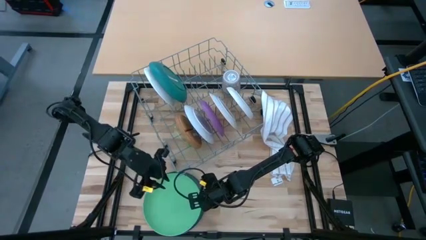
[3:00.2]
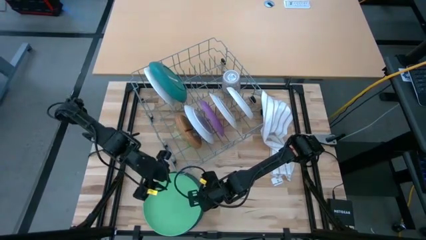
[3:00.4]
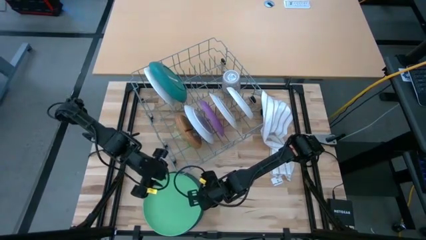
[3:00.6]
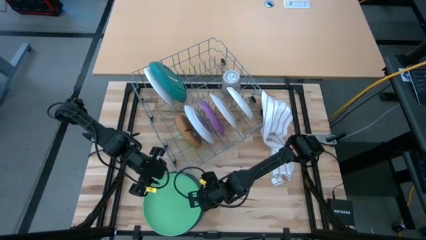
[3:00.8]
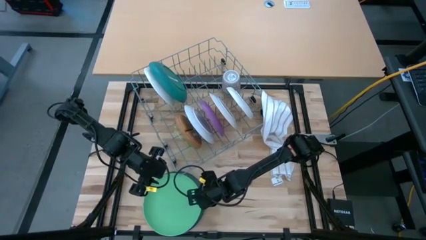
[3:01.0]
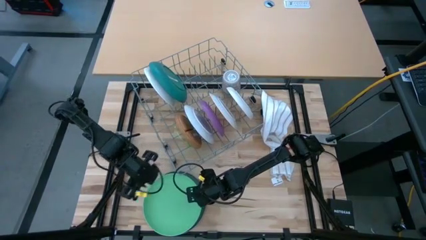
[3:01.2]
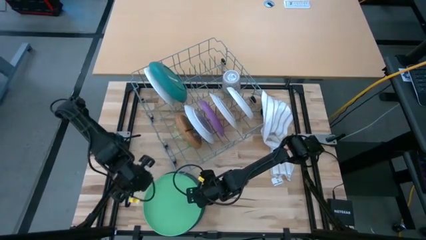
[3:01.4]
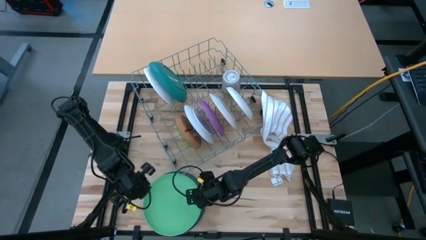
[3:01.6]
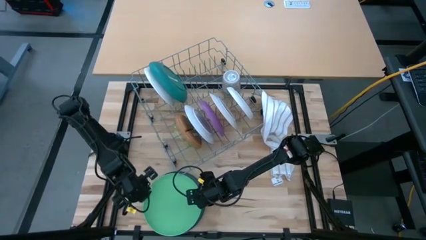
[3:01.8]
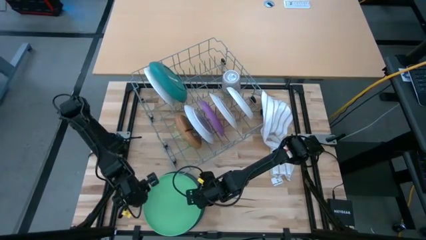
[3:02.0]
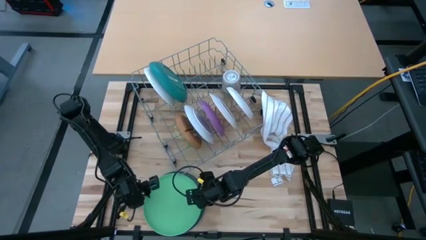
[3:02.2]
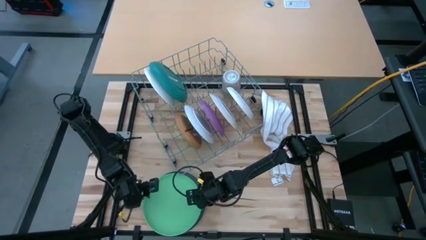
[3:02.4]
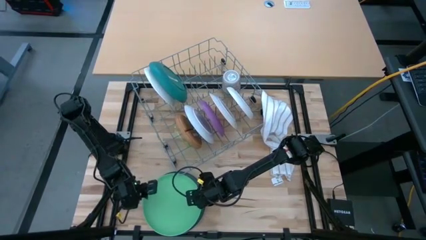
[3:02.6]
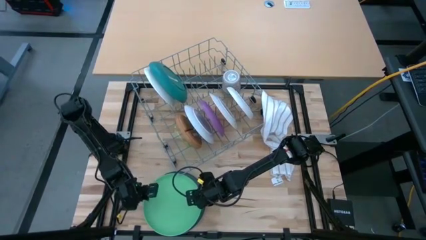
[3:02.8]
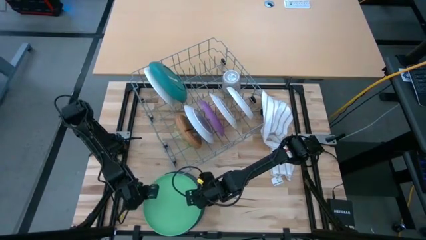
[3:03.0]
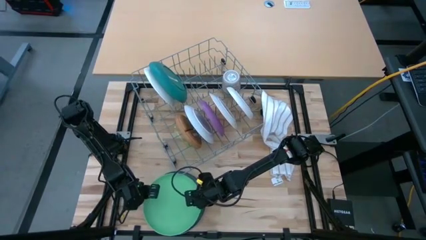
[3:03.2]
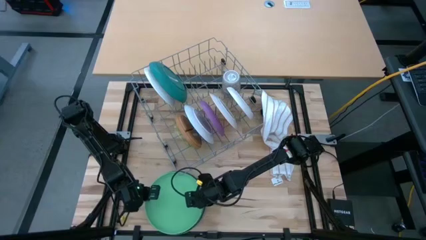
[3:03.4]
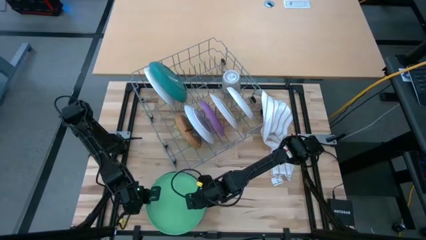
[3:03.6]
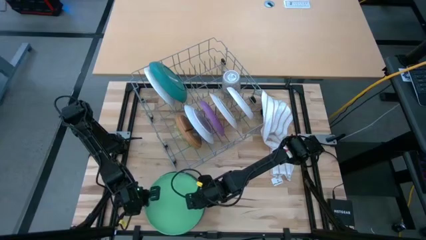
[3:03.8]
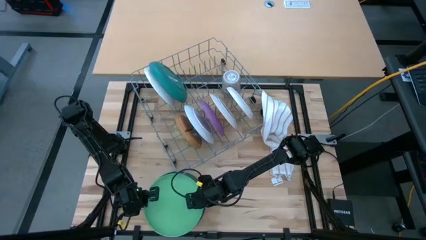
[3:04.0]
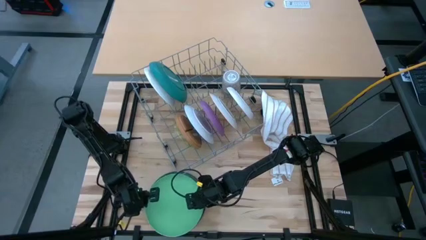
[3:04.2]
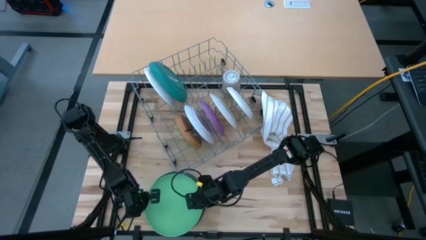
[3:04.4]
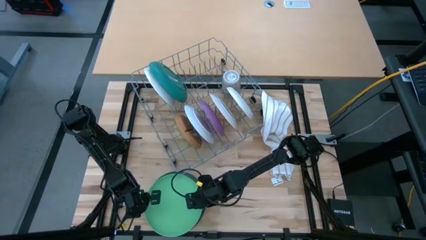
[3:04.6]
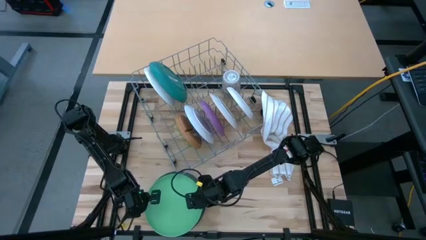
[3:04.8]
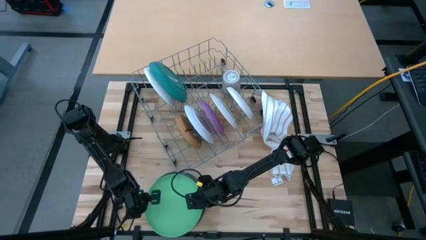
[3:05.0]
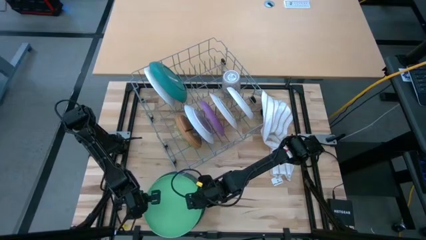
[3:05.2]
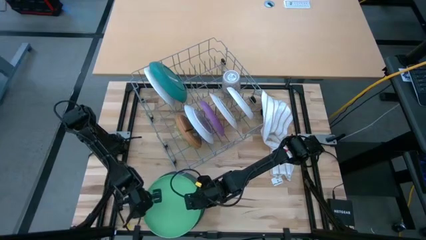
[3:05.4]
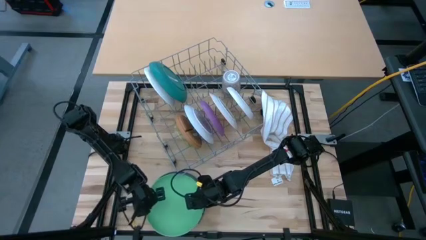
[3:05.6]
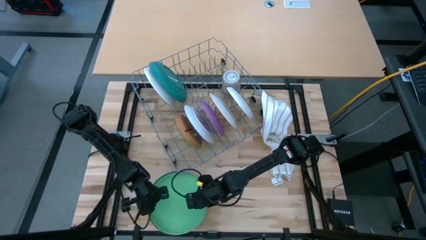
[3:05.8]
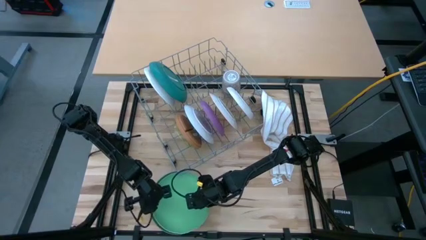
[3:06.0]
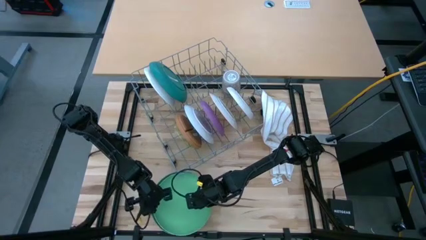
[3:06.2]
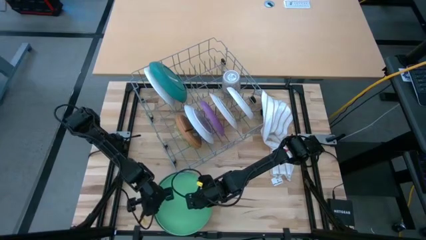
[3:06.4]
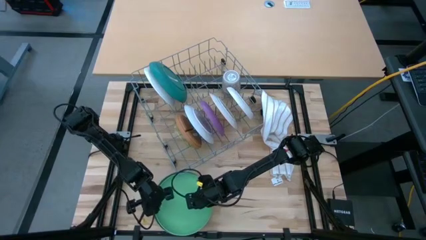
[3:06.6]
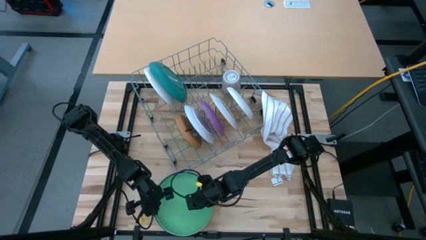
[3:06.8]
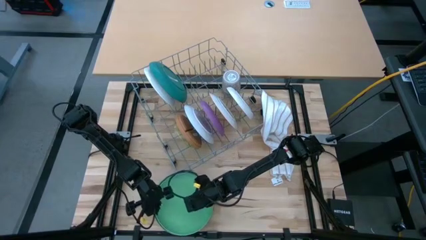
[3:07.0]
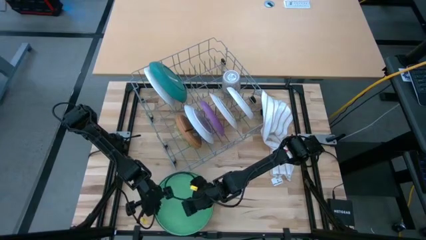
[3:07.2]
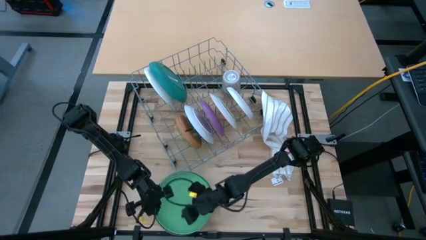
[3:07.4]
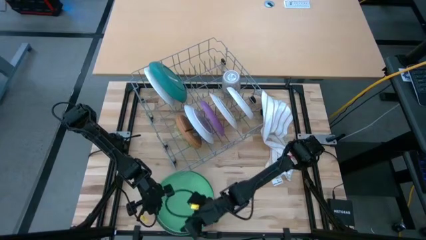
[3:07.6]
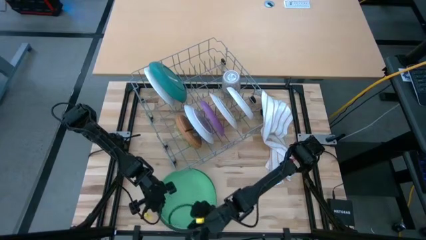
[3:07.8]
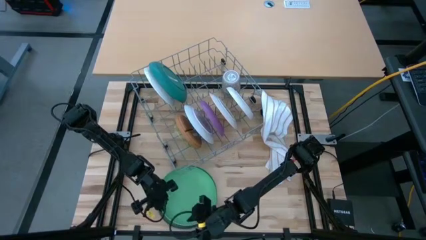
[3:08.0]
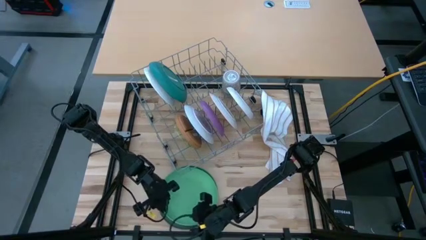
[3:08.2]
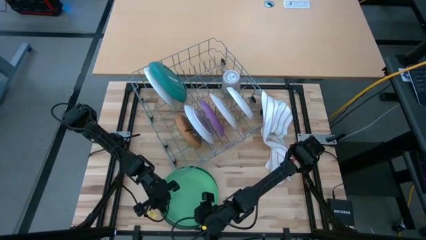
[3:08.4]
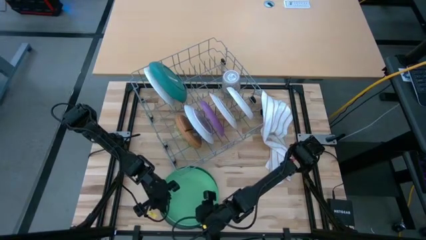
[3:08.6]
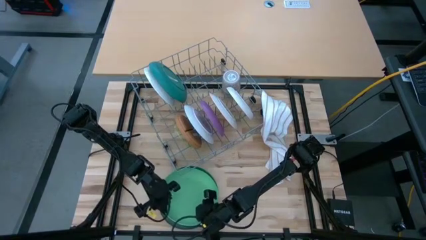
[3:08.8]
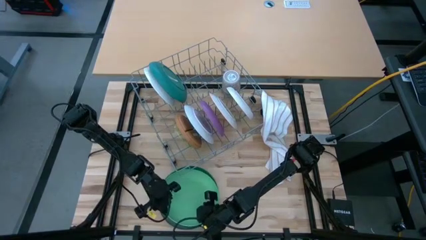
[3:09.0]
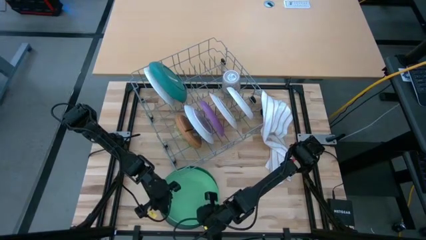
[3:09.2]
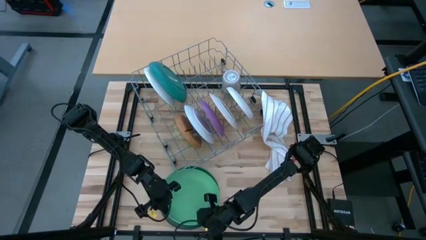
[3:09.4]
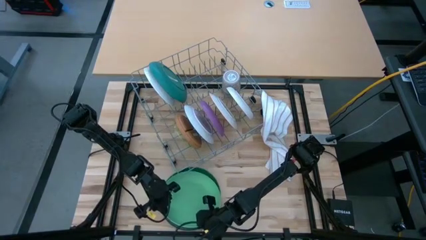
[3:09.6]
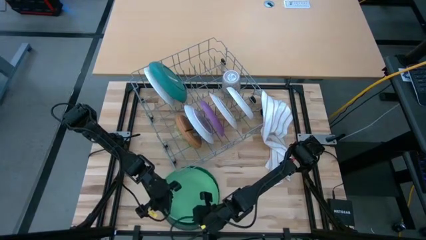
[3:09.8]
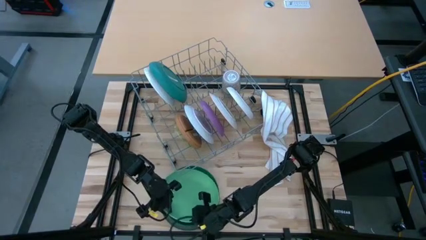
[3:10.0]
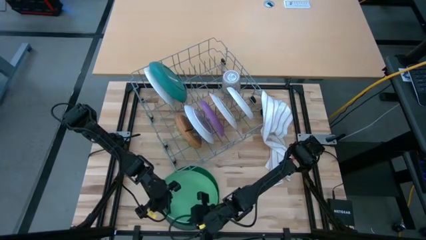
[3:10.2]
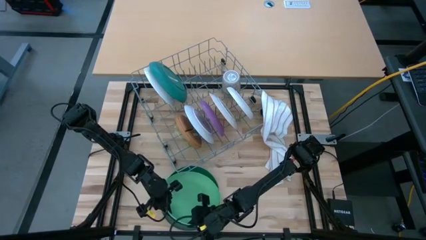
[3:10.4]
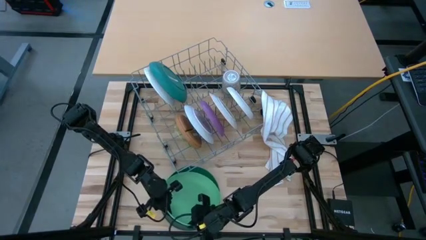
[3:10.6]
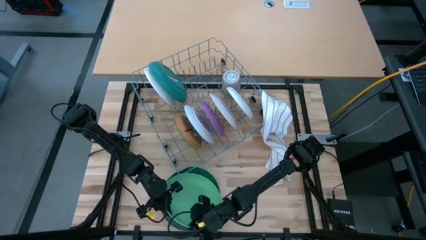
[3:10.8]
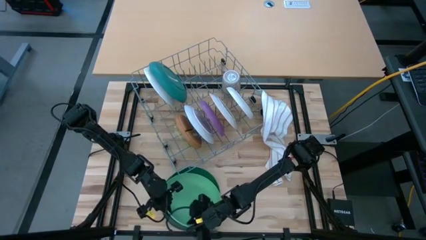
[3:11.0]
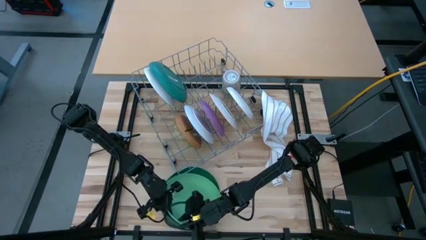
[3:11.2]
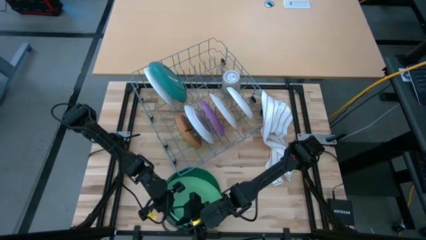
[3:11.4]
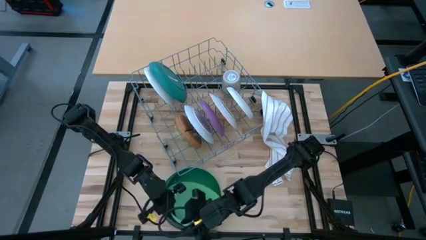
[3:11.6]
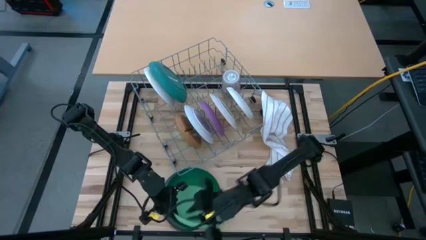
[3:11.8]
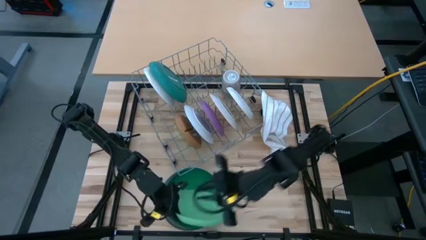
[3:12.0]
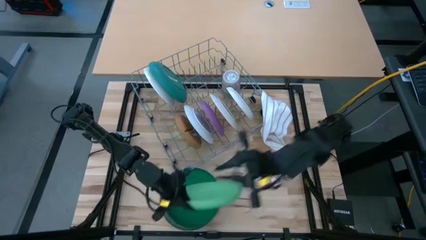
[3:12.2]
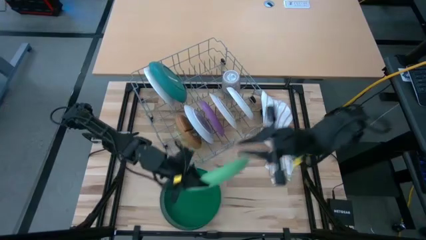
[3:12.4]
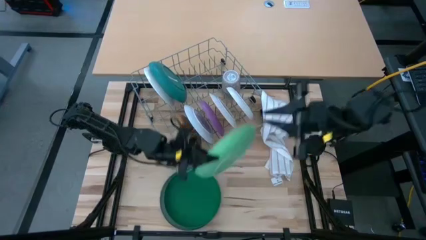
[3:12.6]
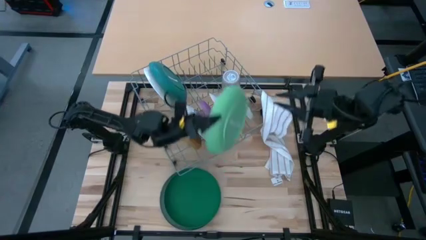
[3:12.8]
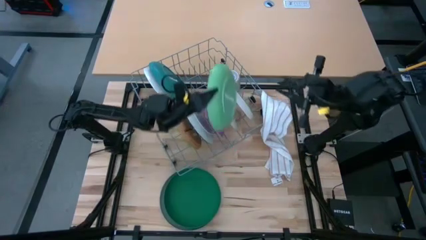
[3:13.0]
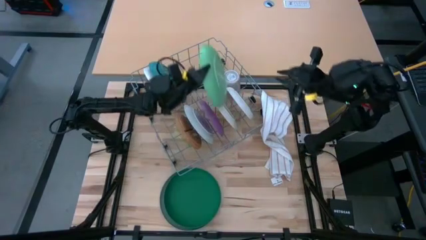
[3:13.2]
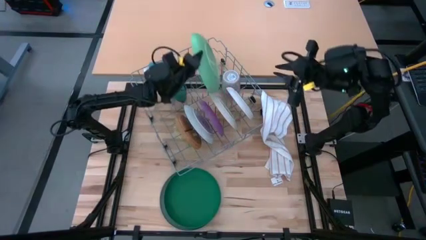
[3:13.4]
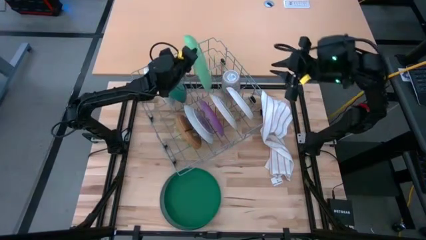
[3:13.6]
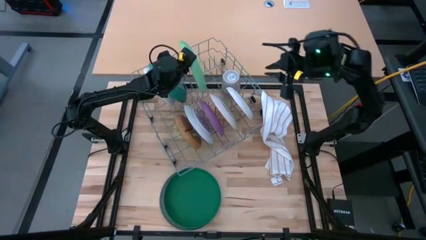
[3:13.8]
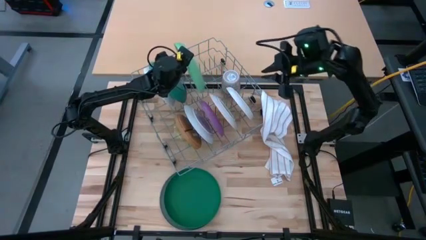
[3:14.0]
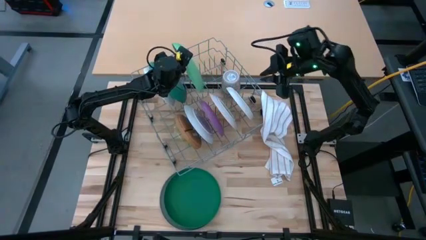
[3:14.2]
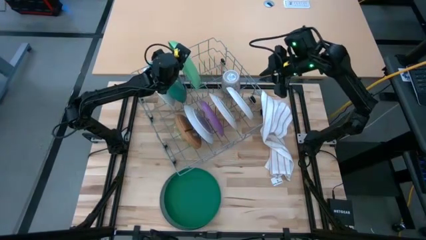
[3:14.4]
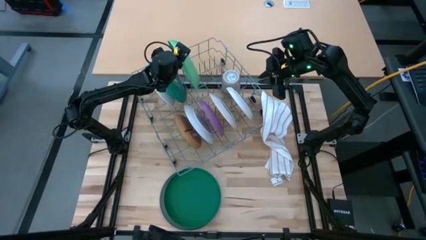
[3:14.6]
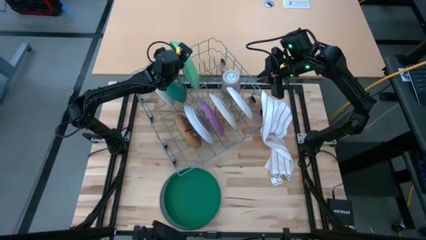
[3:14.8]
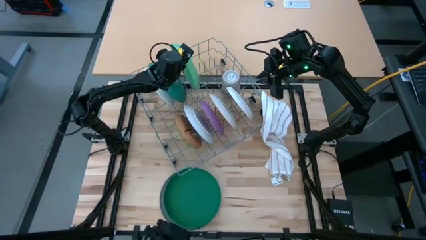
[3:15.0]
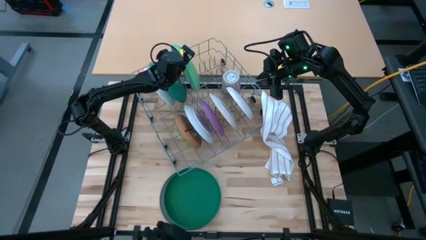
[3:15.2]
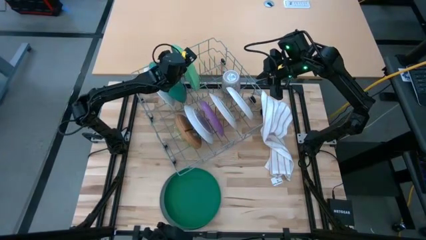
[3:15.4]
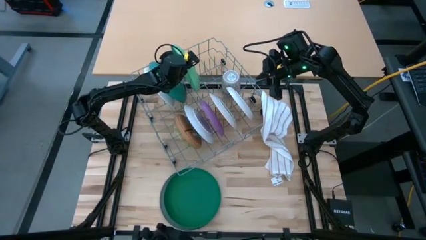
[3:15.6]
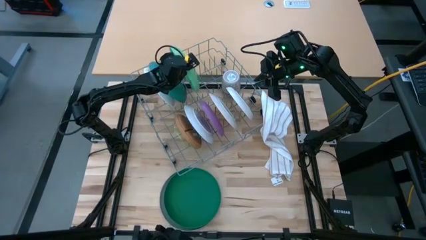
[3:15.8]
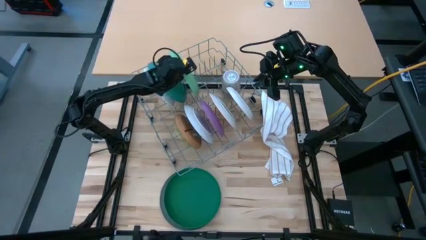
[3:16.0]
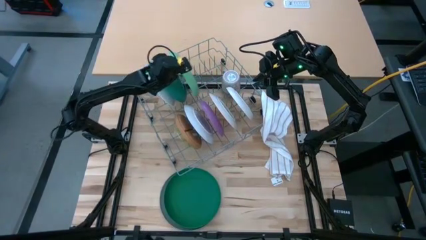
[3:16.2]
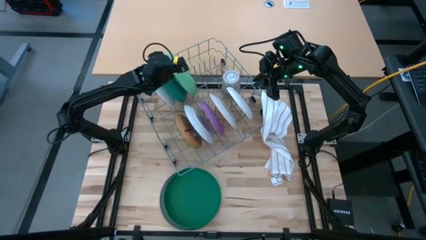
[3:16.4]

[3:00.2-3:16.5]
Task: Sort dishes
Put the light green plate into the dish rack
